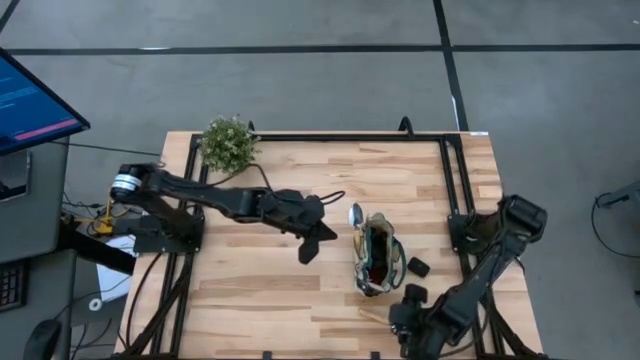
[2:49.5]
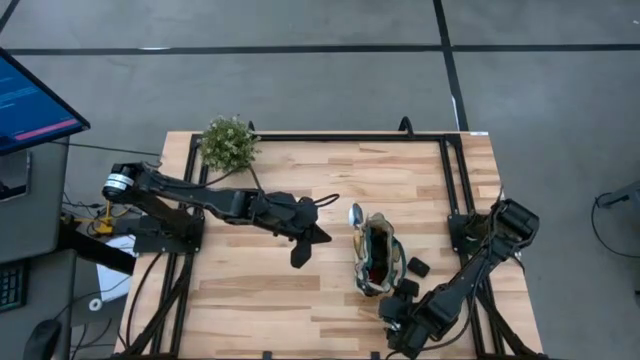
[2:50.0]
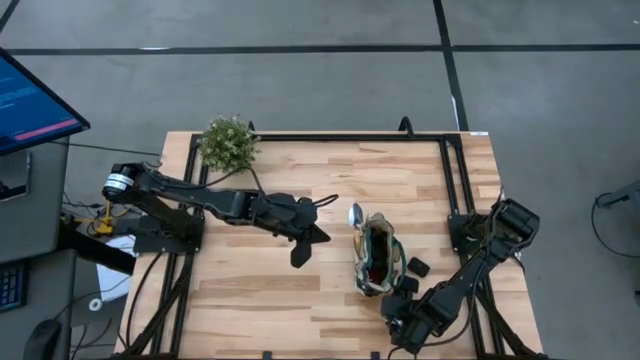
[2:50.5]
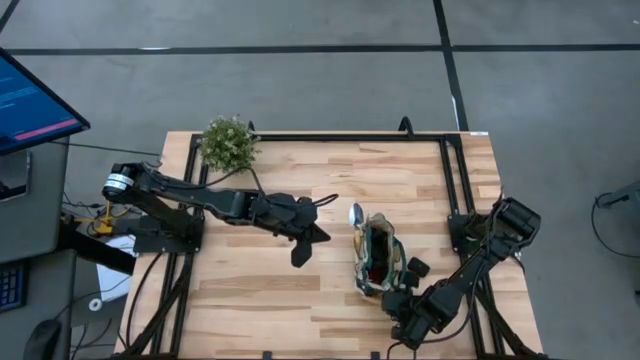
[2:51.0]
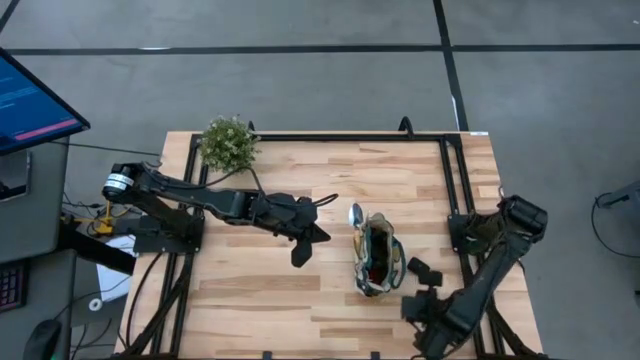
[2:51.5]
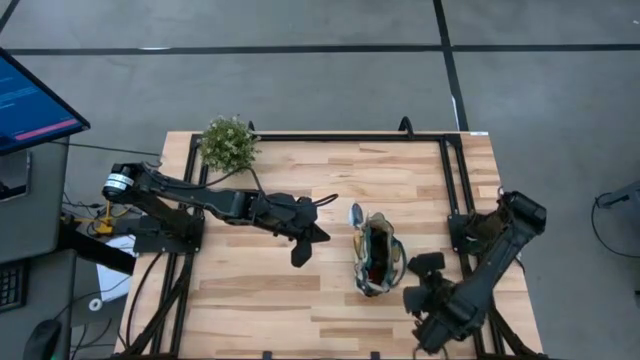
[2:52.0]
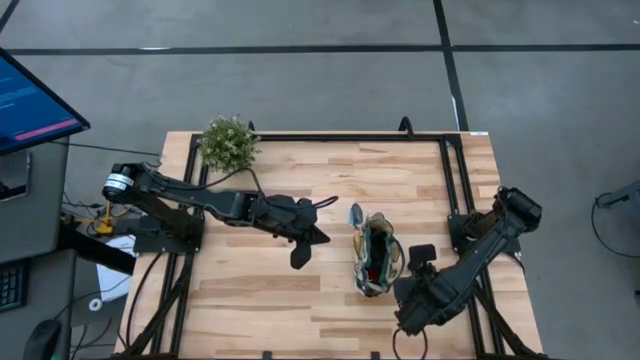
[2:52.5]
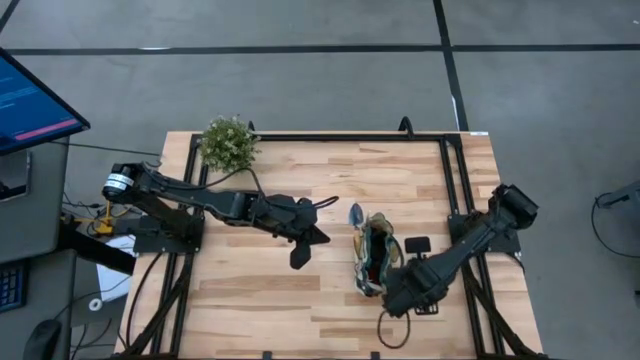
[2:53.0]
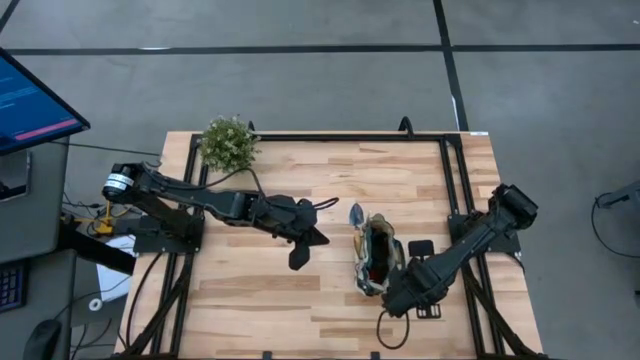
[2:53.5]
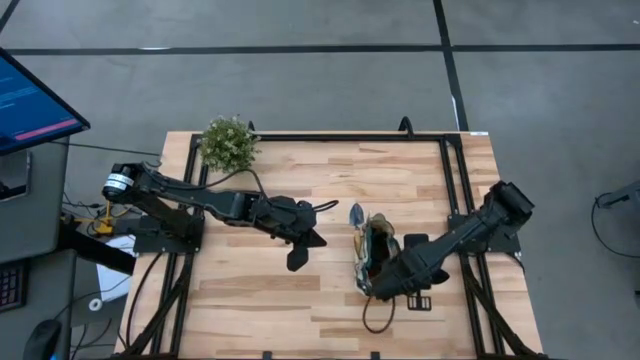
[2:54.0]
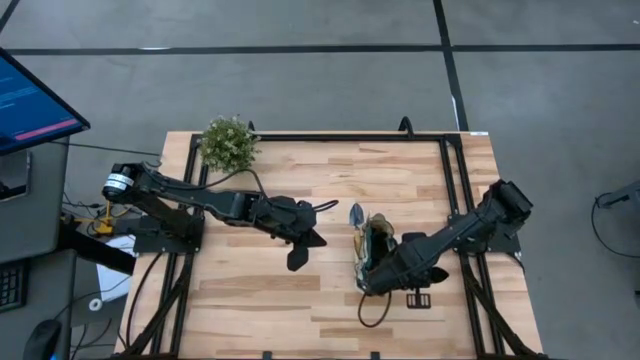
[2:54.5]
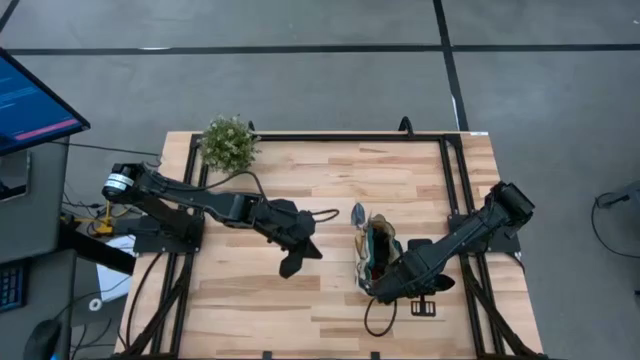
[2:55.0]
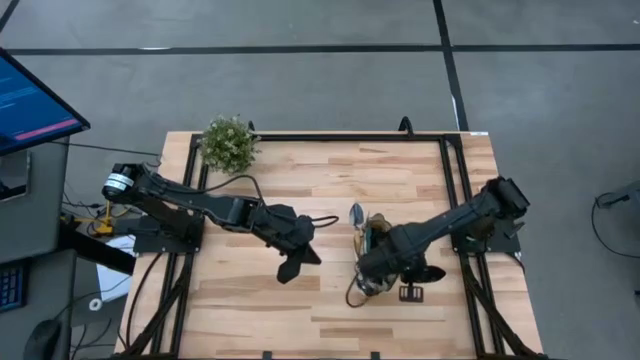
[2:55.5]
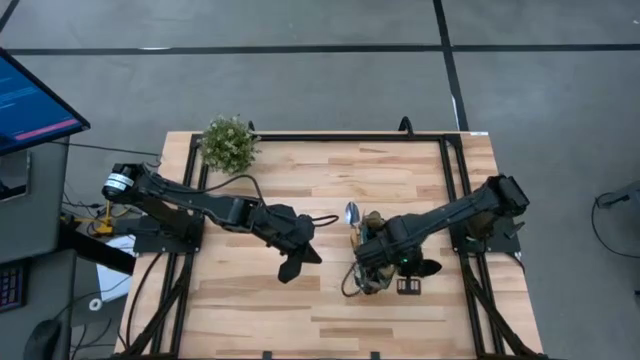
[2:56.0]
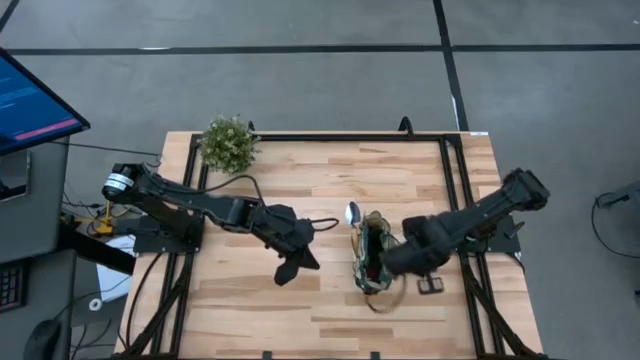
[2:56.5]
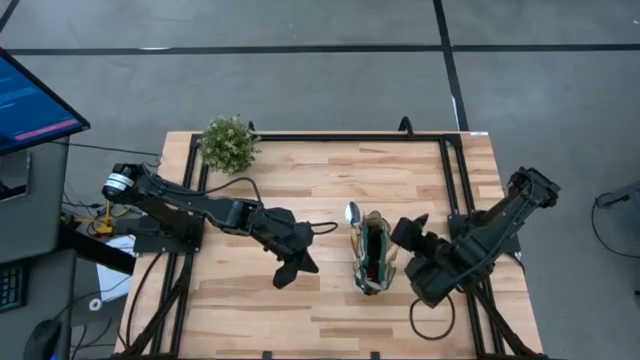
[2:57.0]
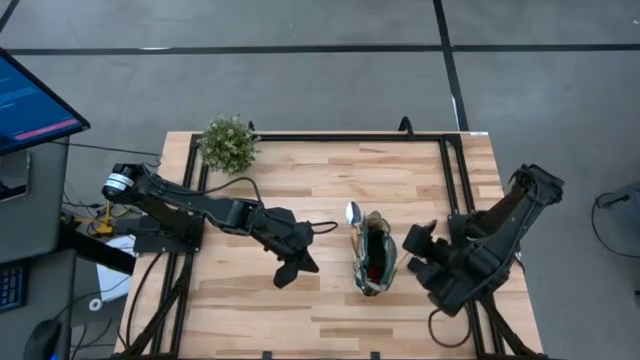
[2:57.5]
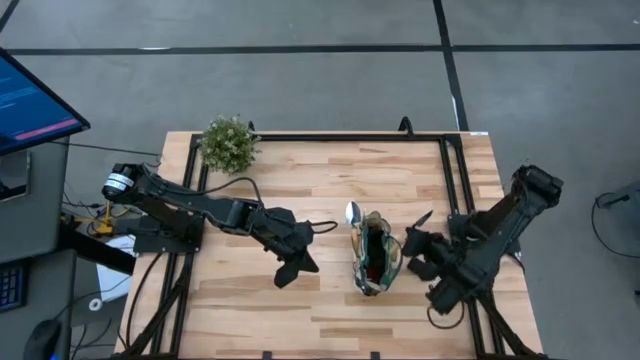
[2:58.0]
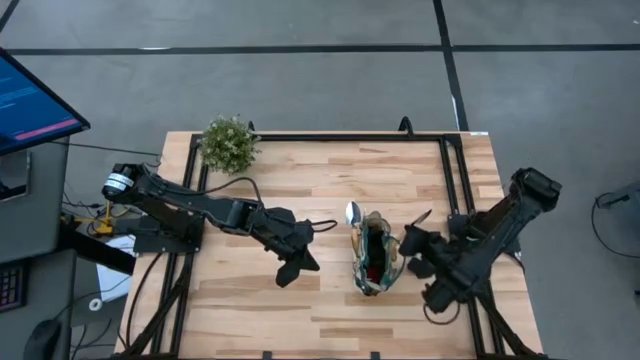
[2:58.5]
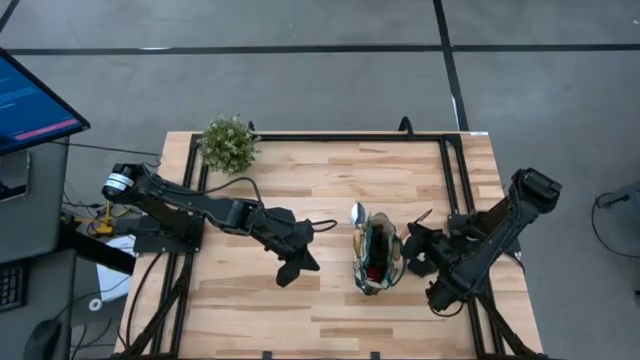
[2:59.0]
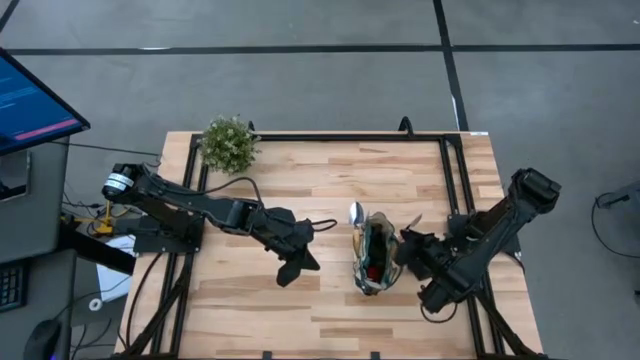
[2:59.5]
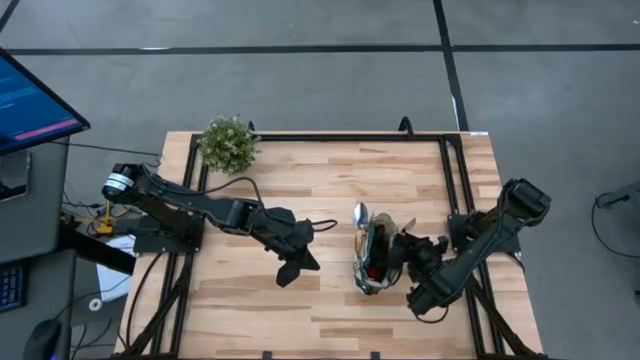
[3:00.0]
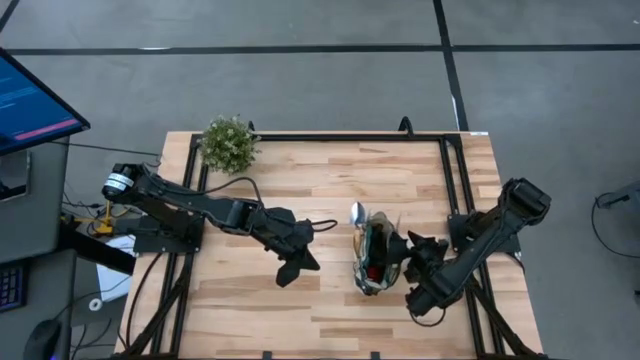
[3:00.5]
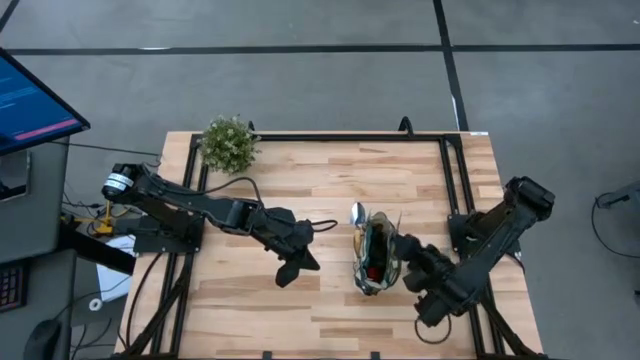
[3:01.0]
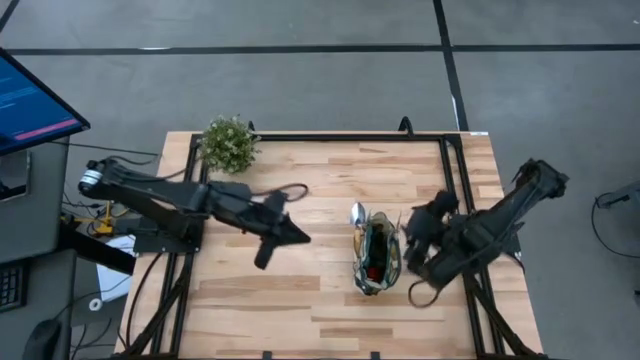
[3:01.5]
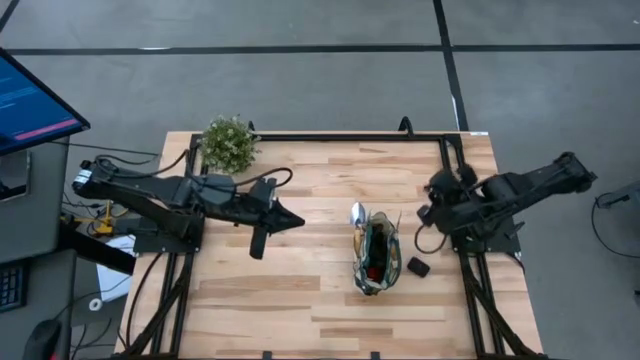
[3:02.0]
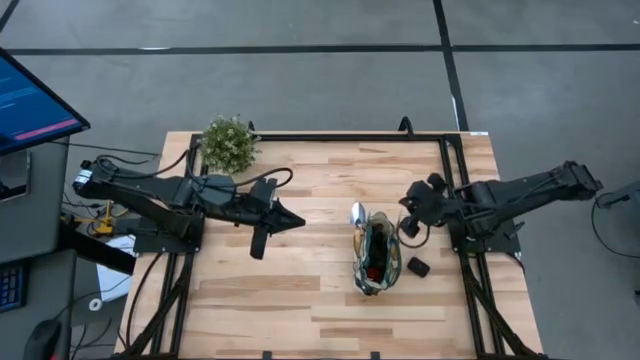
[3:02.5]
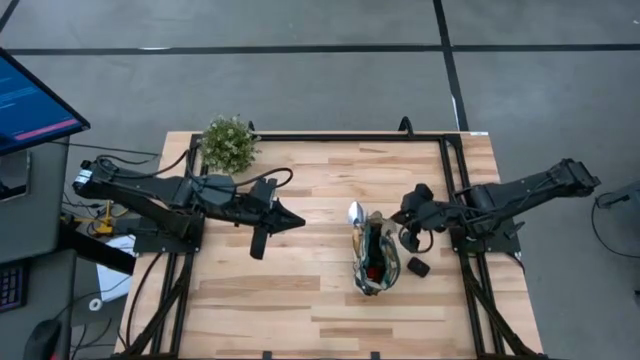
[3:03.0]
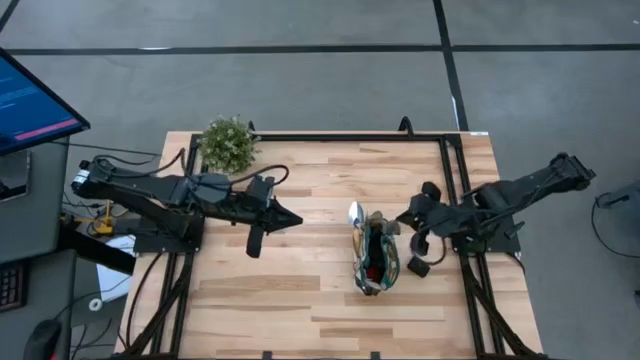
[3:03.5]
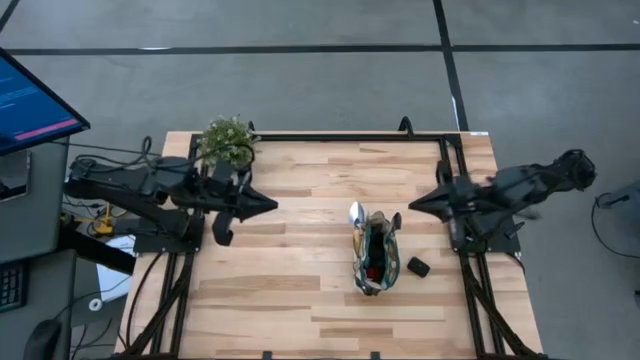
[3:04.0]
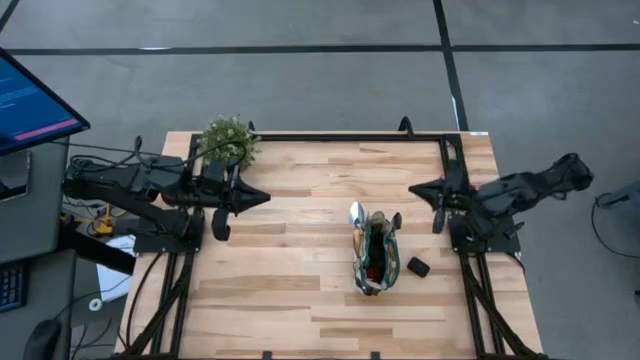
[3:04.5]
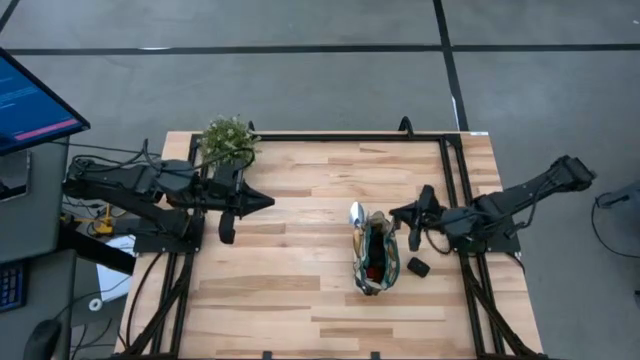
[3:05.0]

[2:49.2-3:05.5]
Task: Pick & Place Garden tools in Gardening bag
Put the yellow trowel into the yellow gardening bag

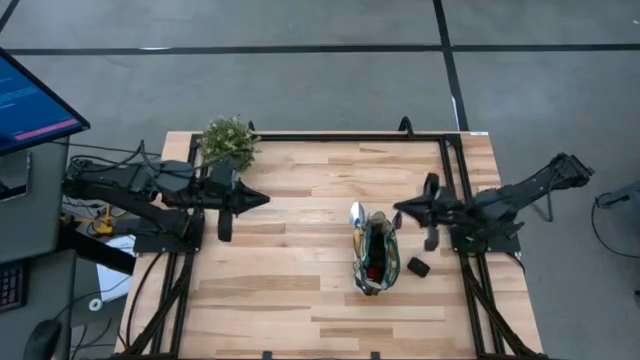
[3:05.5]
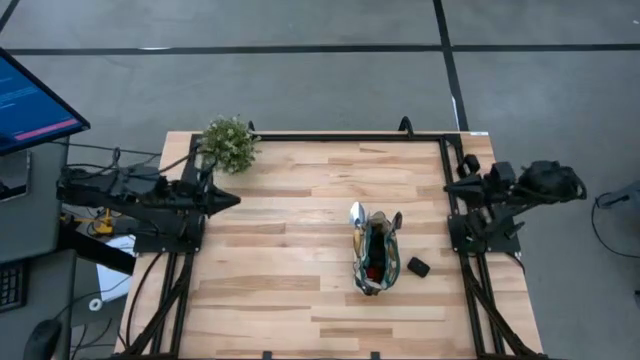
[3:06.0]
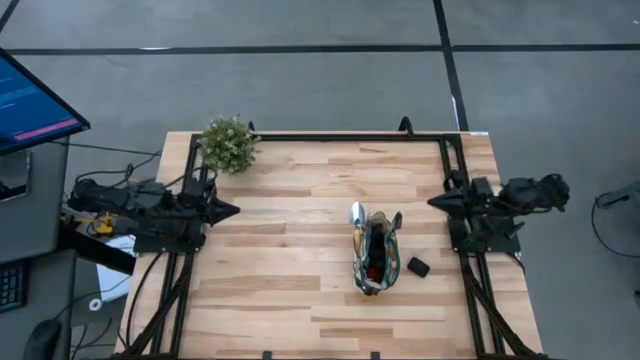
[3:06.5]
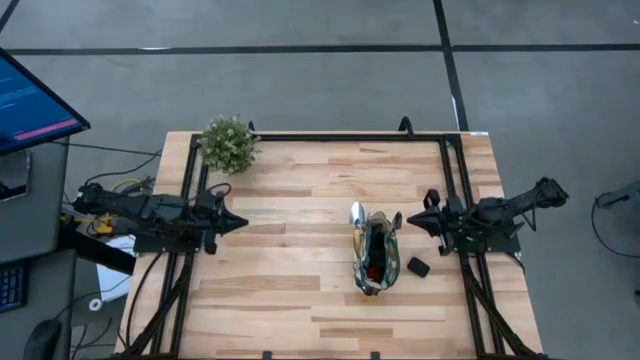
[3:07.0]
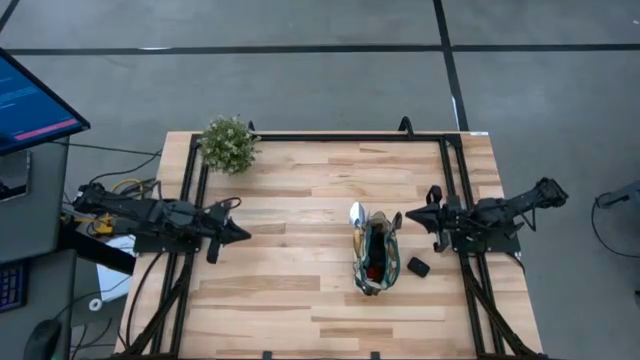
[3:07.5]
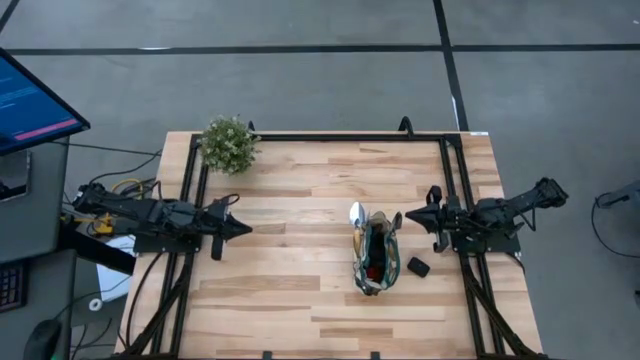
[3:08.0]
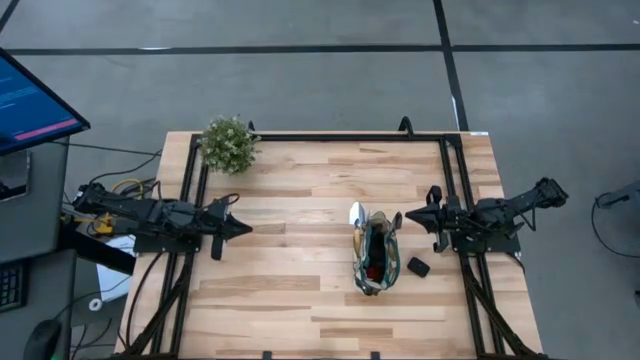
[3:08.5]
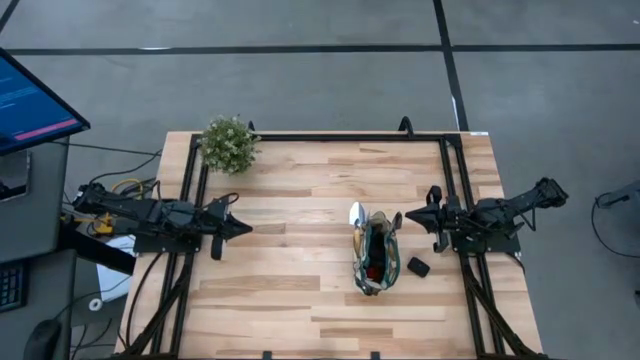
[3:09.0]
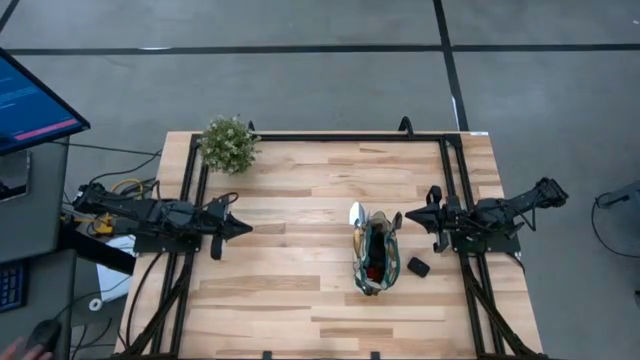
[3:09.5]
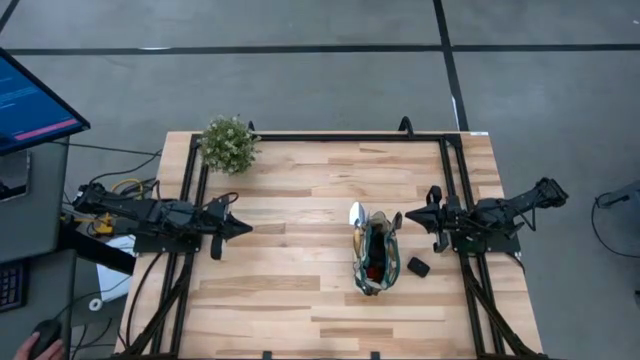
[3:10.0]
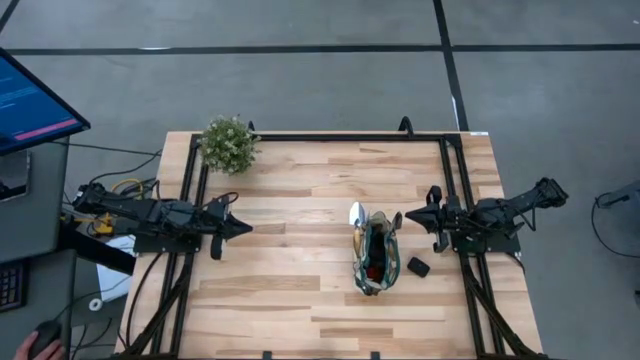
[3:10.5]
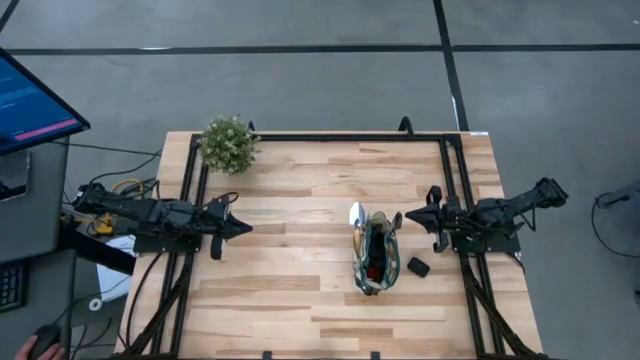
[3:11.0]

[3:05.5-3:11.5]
Return to Home Position
